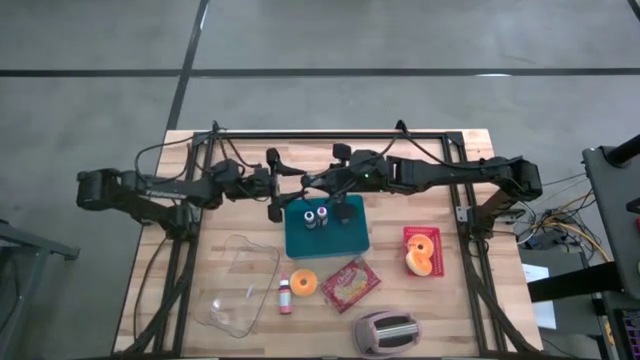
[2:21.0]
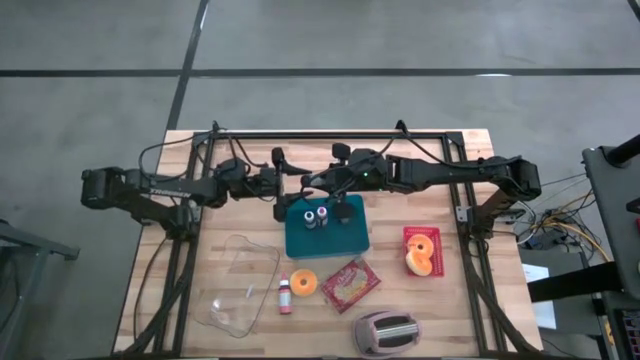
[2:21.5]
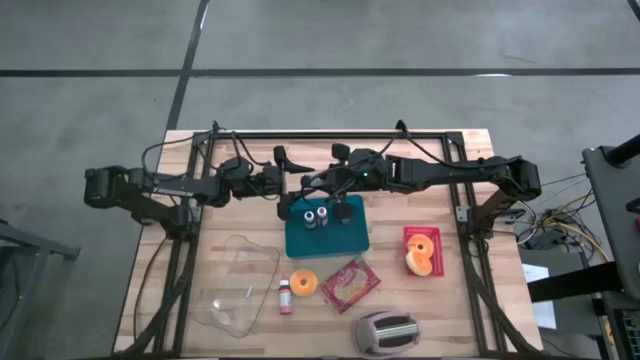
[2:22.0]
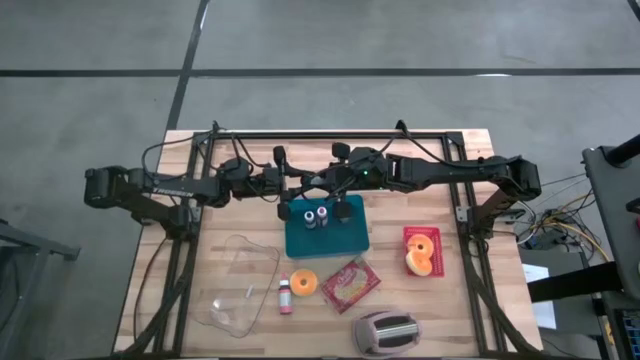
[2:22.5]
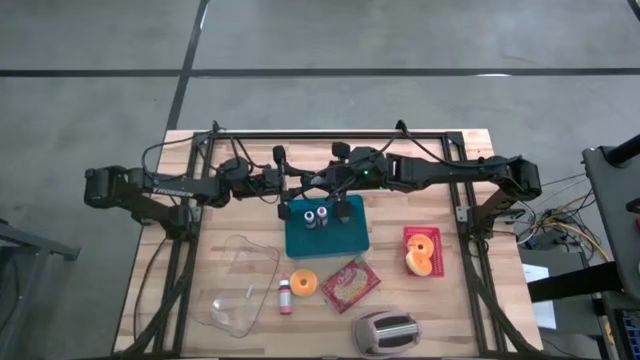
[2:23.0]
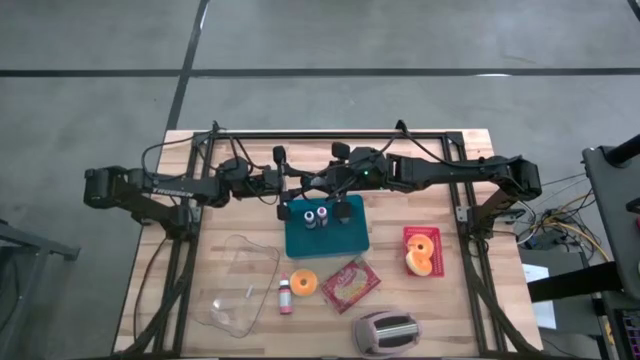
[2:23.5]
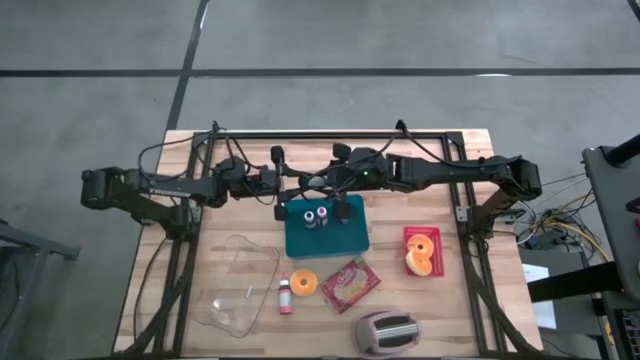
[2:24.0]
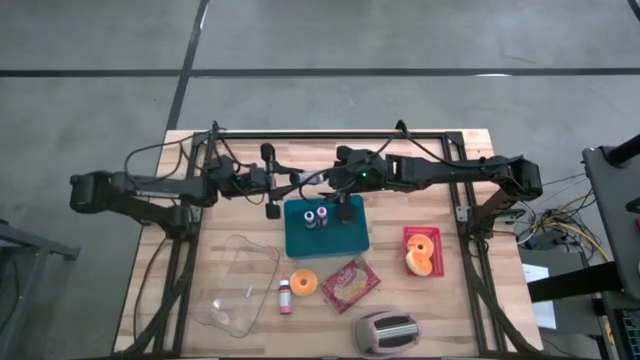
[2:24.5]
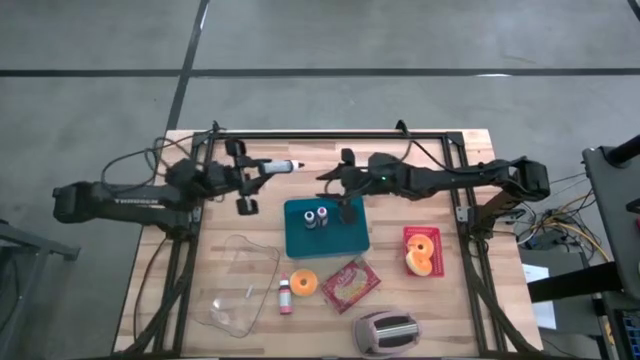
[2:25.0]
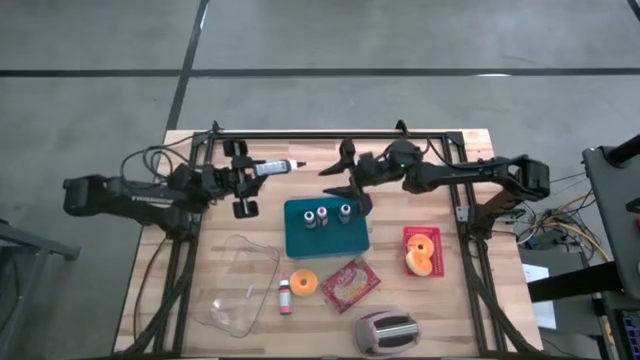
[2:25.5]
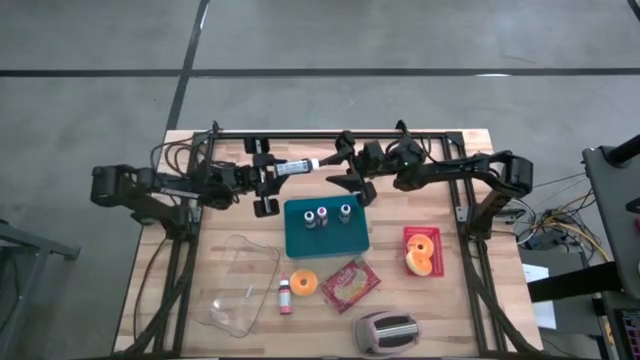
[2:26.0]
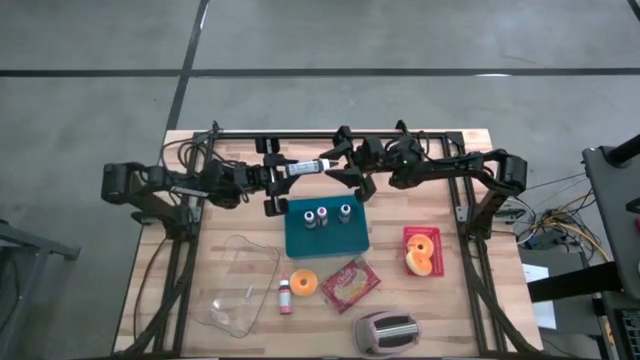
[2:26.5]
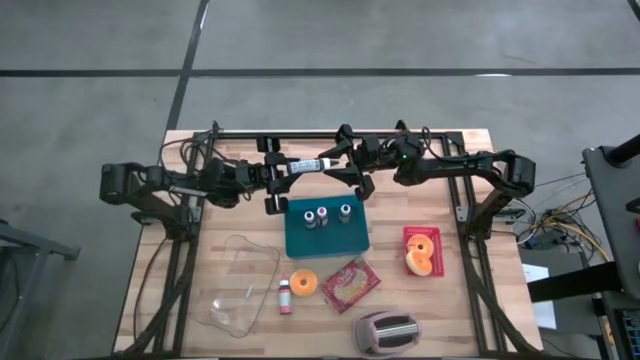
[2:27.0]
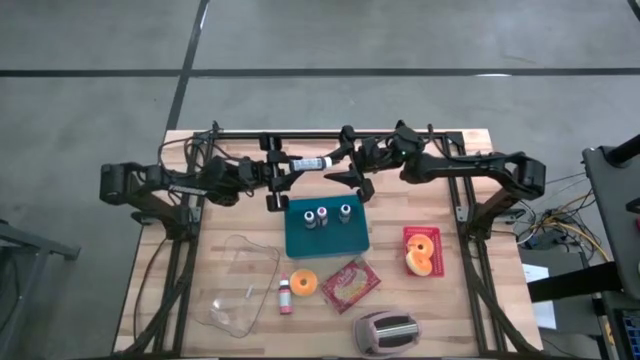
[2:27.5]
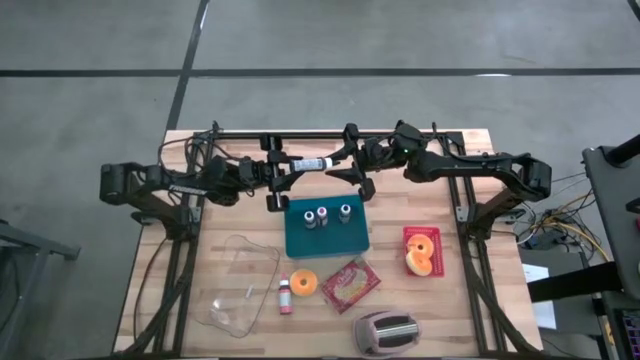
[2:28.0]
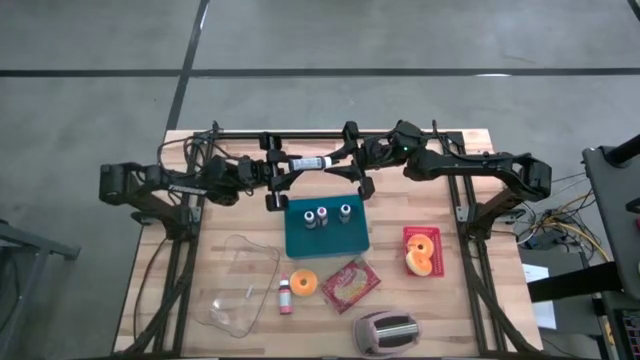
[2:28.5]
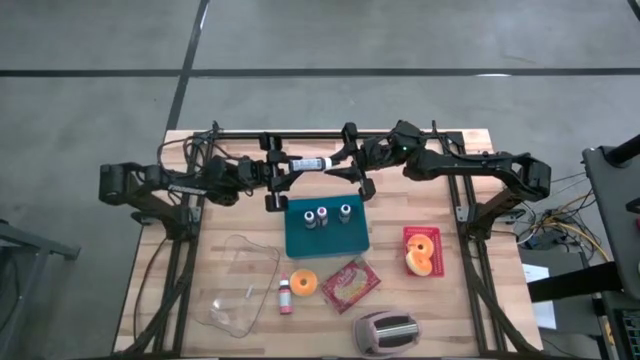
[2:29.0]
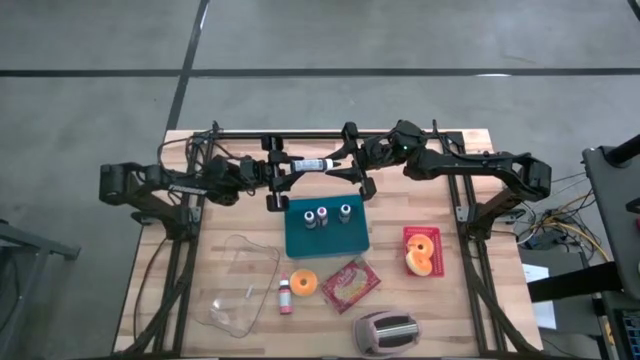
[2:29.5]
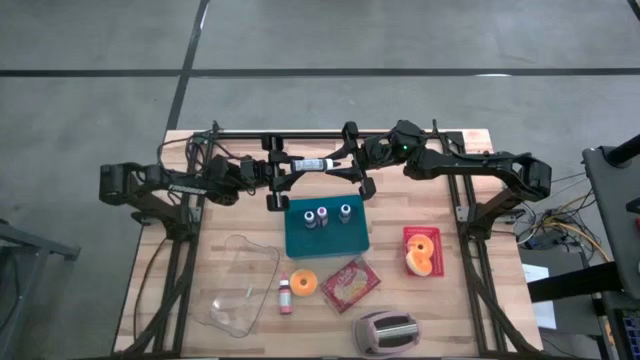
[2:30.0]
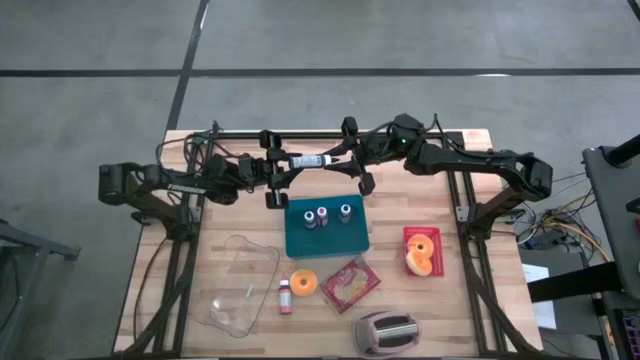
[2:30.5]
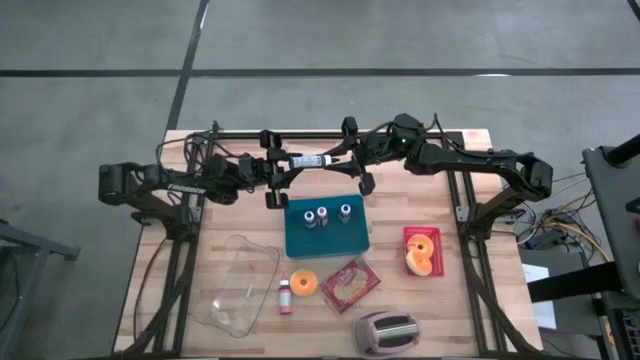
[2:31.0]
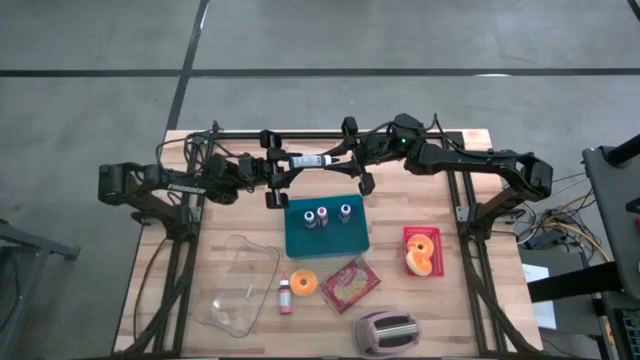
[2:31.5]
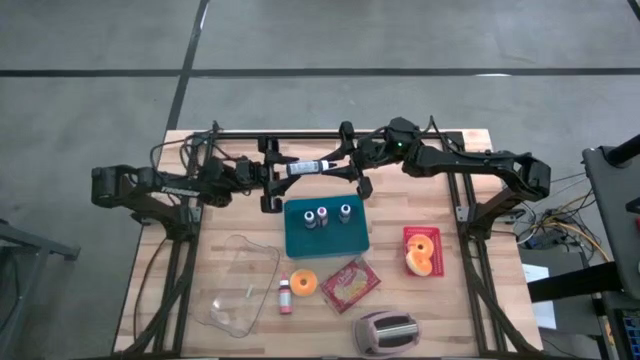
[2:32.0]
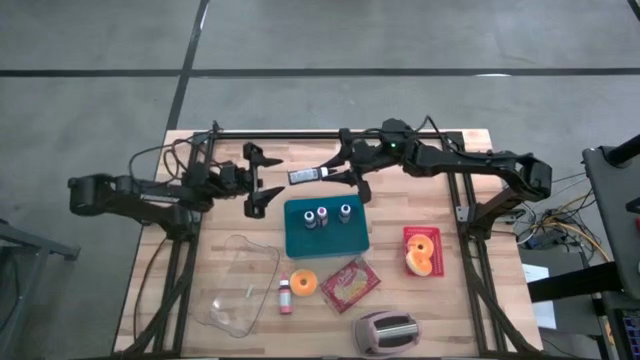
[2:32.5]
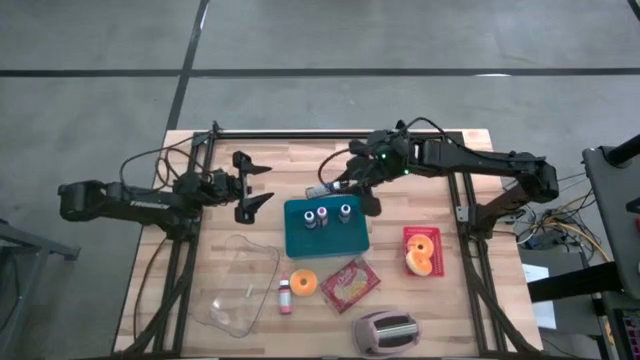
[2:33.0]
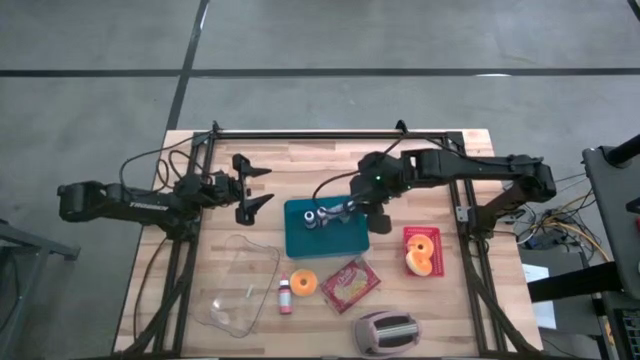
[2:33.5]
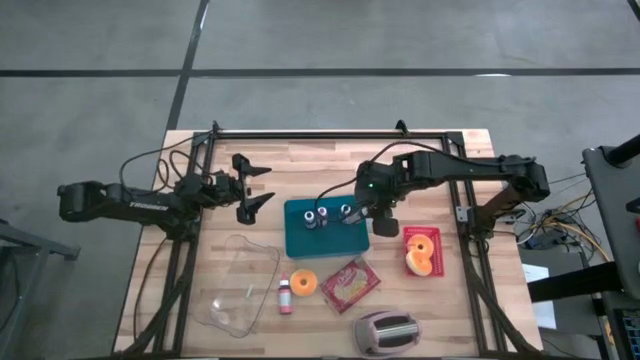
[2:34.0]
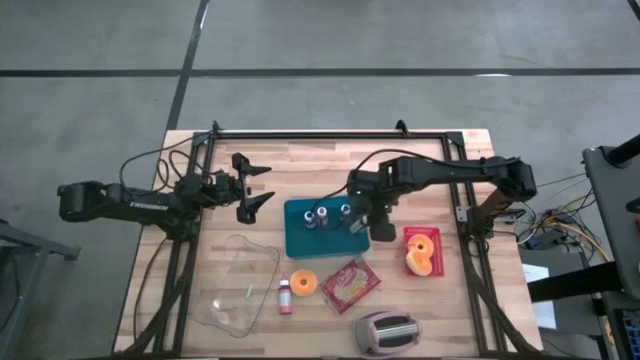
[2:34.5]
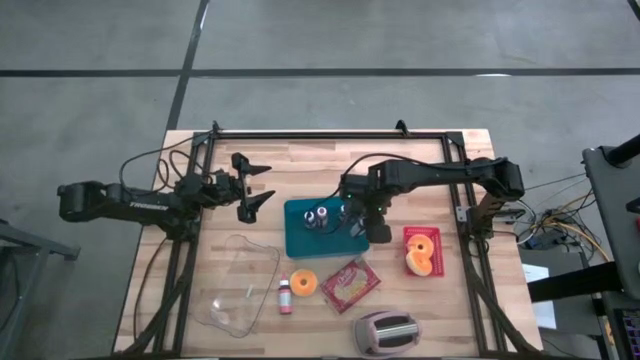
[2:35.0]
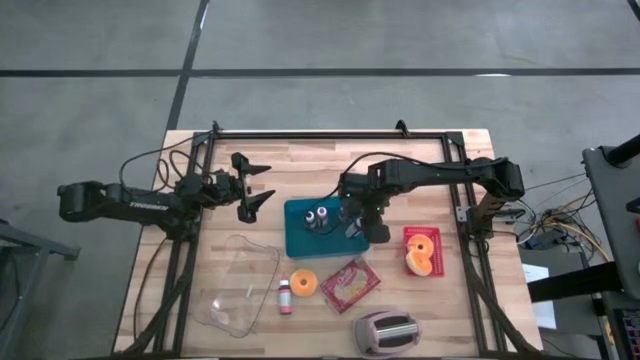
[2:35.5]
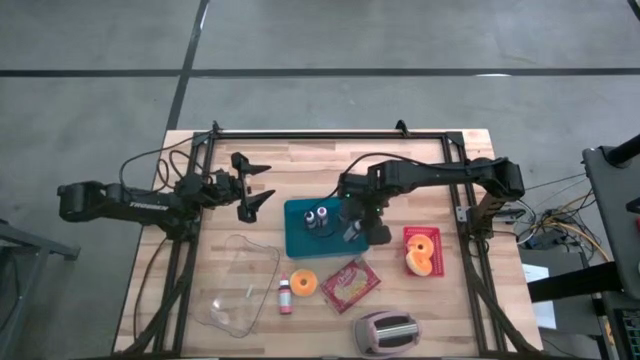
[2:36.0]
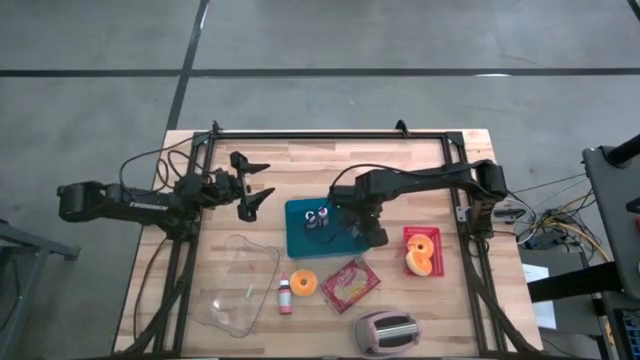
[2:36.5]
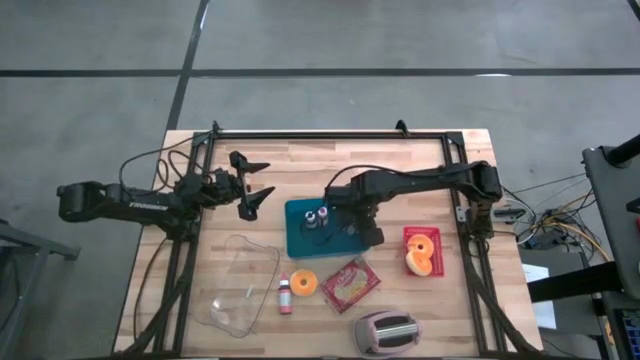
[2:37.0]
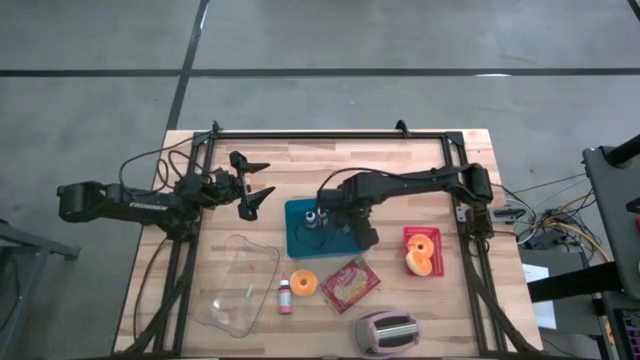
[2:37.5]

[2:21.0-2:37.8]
Task: Pick & Place Food Item
Put the black food coloring bottle into the blue bin

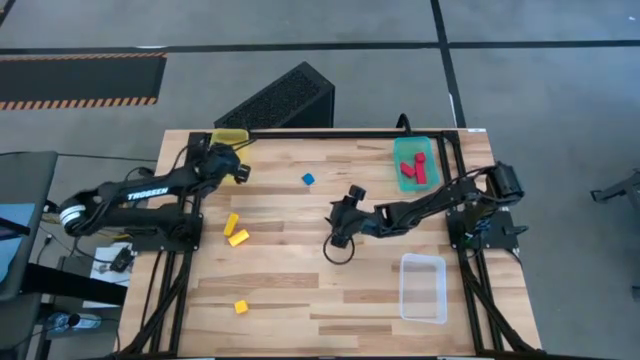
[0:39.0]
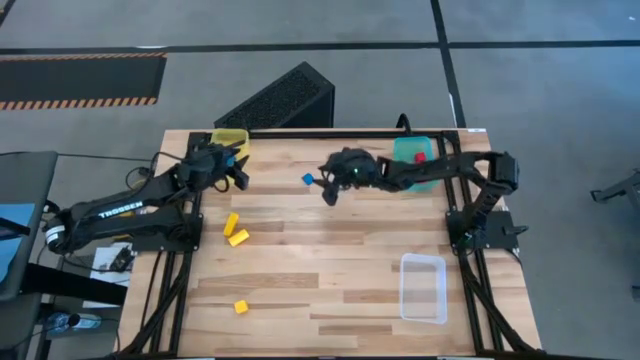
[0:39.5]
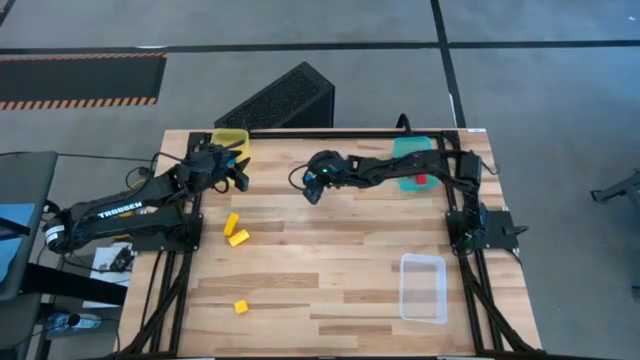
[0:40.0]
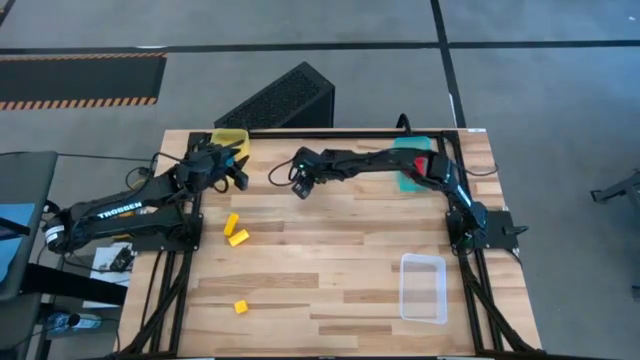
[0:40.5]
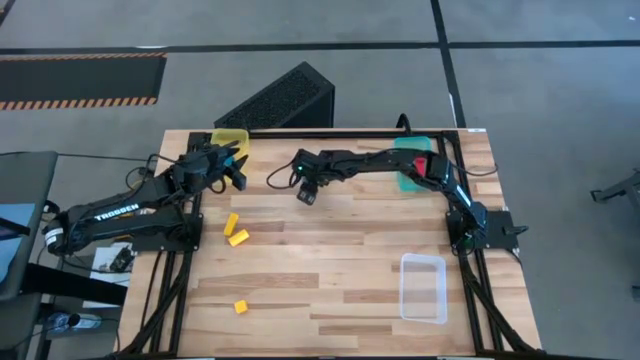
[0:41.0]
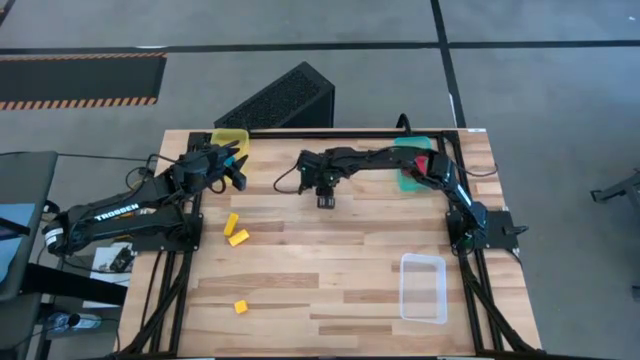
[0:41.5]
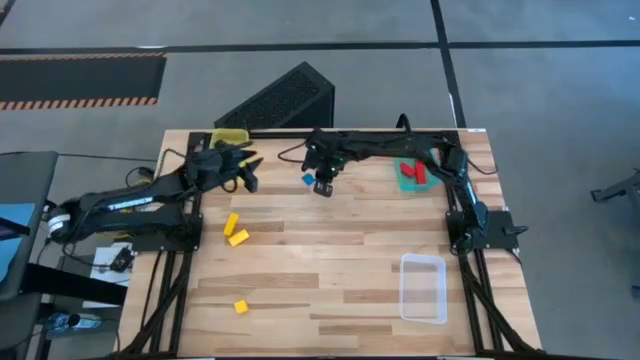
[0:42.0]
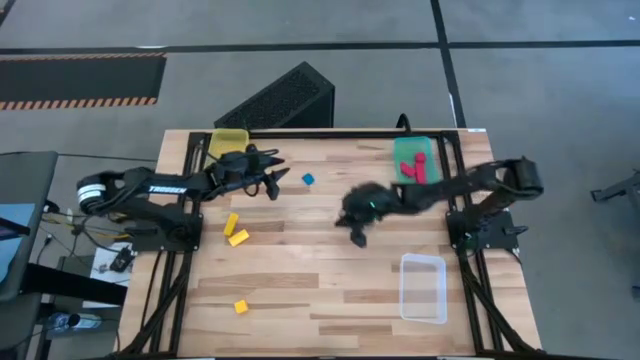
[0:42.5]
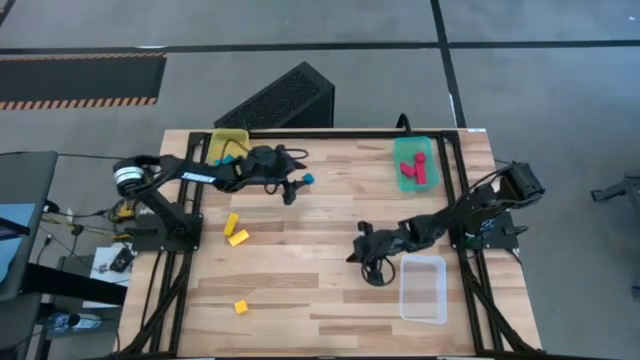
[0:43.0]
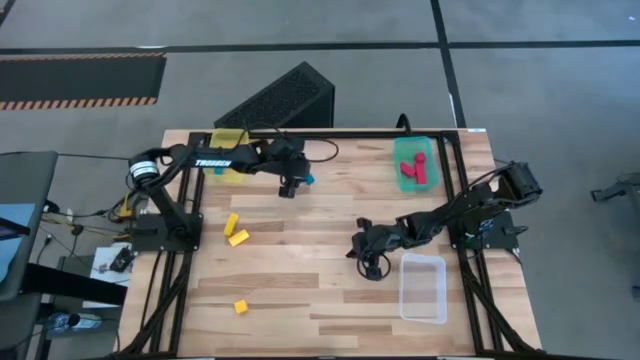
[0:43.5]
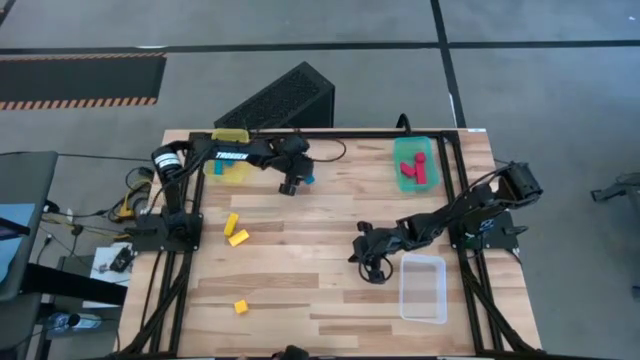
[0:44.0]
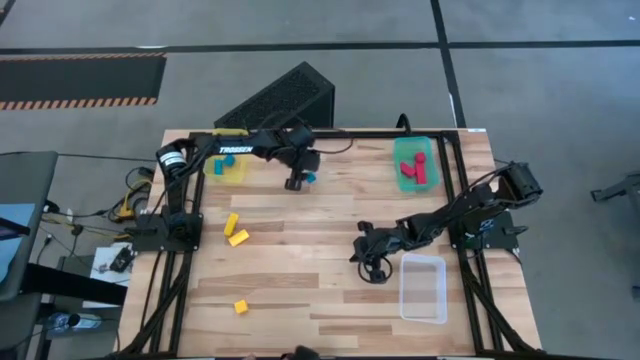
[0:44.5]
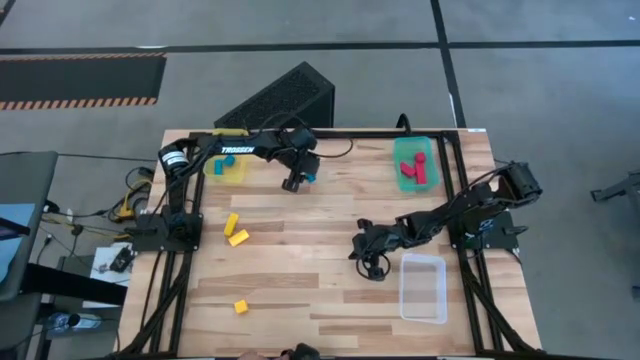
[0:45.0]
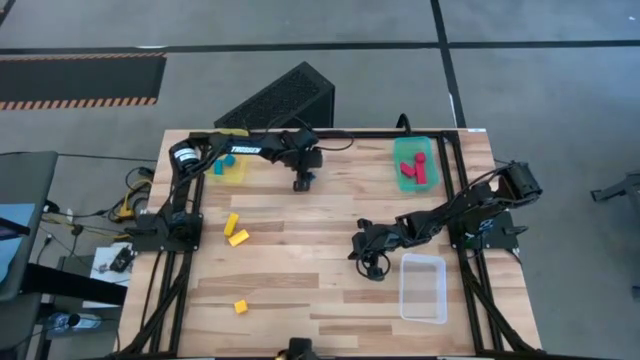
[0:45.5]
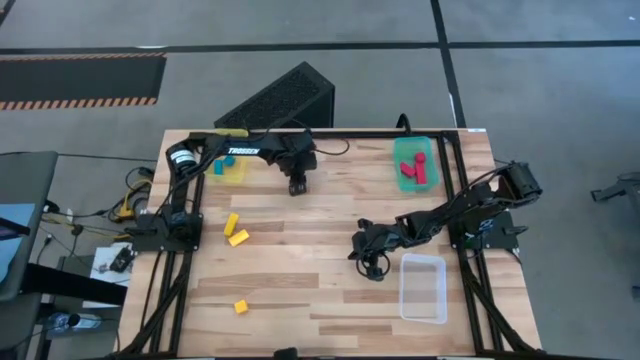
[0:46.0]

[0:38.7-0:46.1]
Task: Sort & place blocks by color
Put the blue block into the yellow bin
